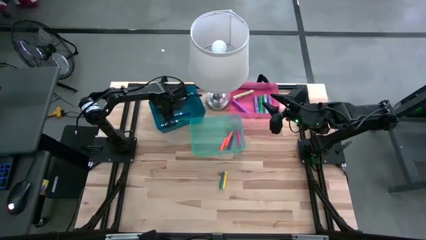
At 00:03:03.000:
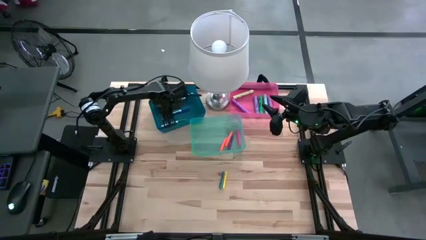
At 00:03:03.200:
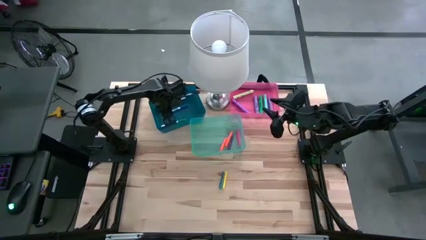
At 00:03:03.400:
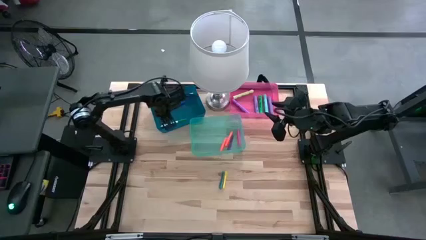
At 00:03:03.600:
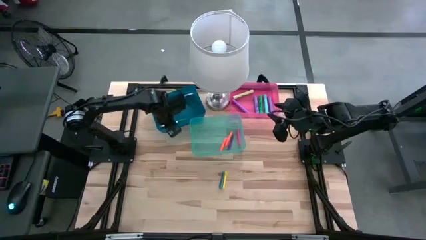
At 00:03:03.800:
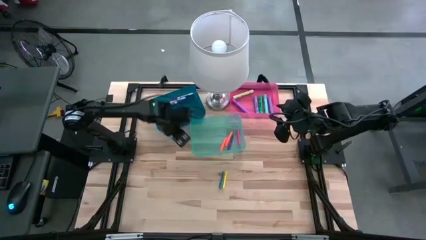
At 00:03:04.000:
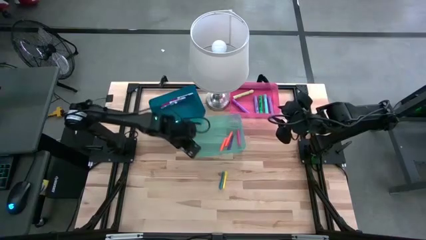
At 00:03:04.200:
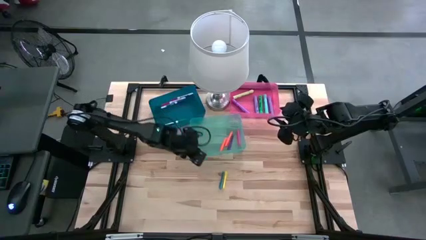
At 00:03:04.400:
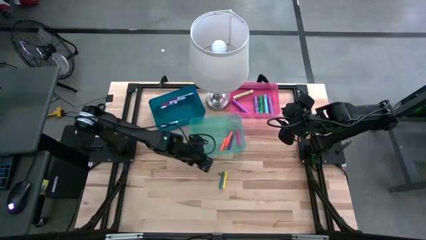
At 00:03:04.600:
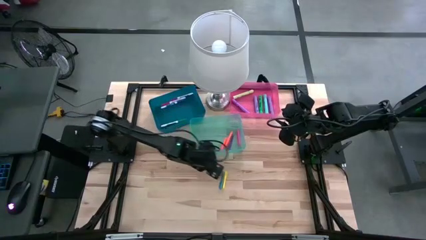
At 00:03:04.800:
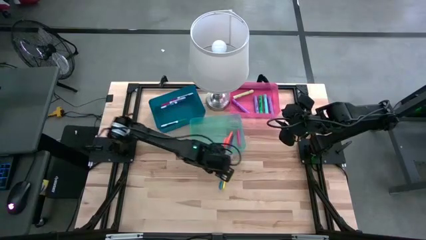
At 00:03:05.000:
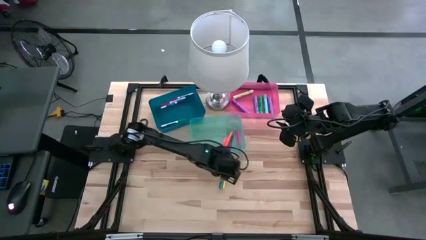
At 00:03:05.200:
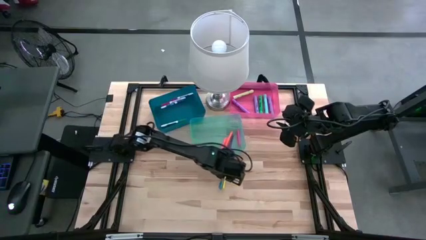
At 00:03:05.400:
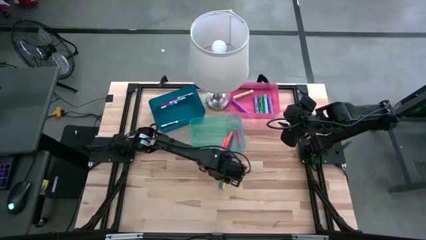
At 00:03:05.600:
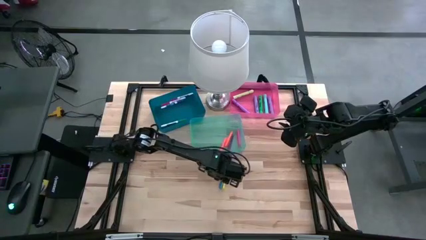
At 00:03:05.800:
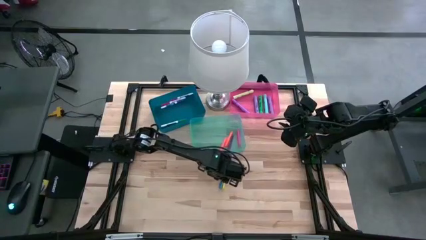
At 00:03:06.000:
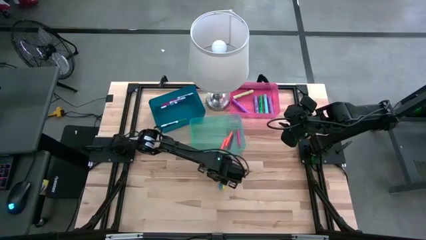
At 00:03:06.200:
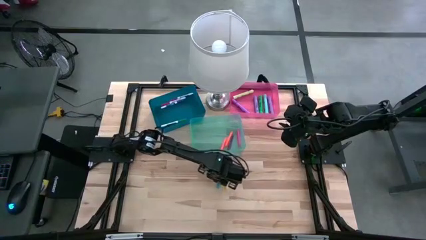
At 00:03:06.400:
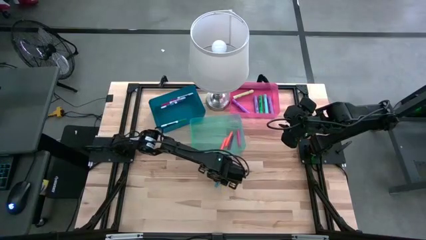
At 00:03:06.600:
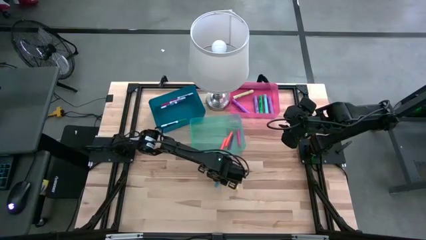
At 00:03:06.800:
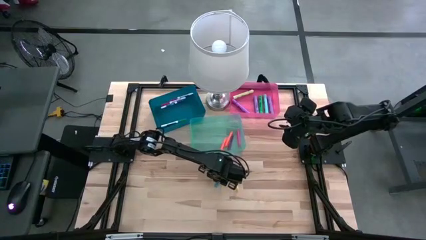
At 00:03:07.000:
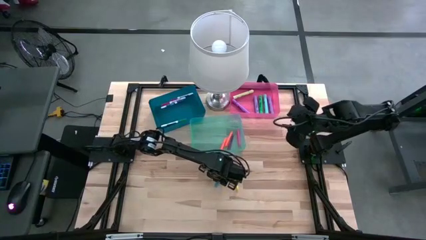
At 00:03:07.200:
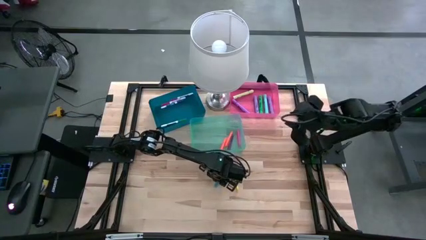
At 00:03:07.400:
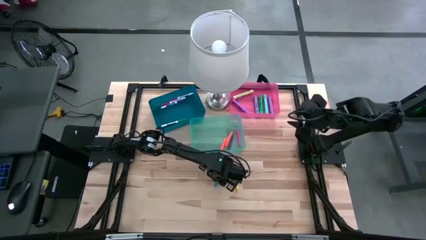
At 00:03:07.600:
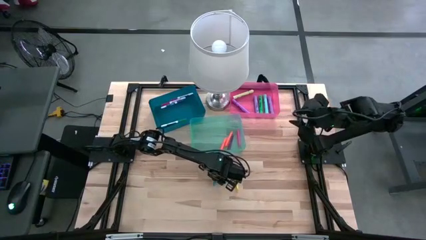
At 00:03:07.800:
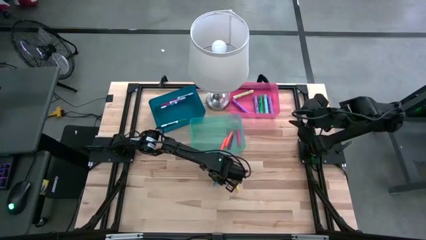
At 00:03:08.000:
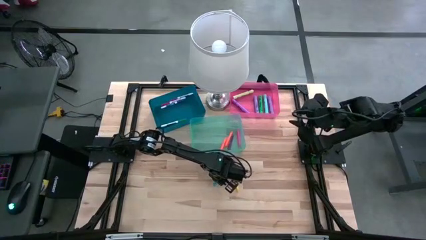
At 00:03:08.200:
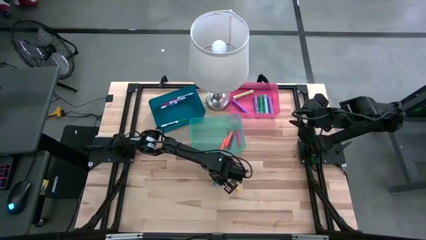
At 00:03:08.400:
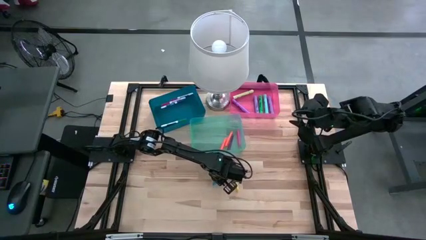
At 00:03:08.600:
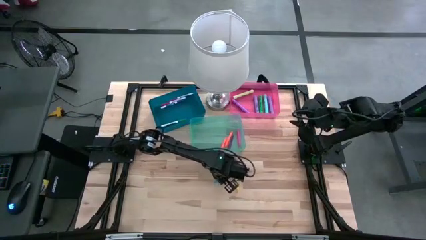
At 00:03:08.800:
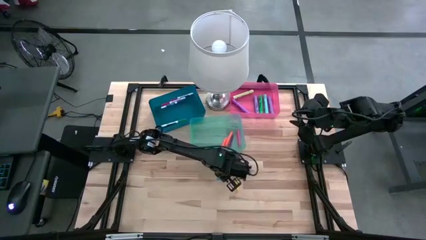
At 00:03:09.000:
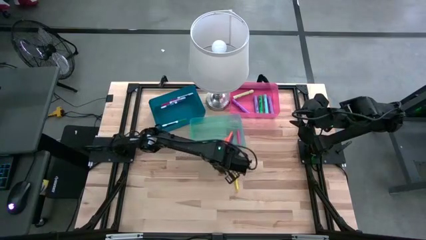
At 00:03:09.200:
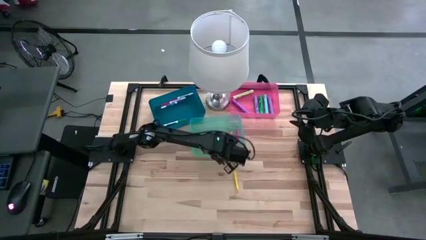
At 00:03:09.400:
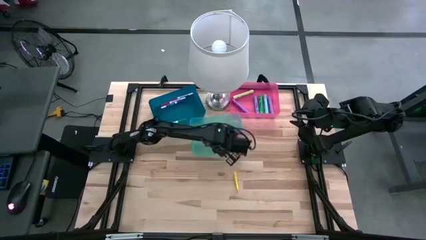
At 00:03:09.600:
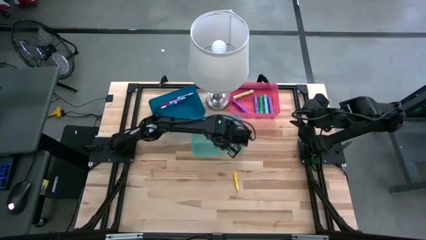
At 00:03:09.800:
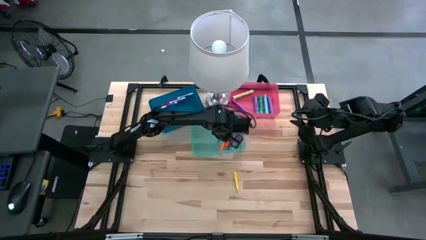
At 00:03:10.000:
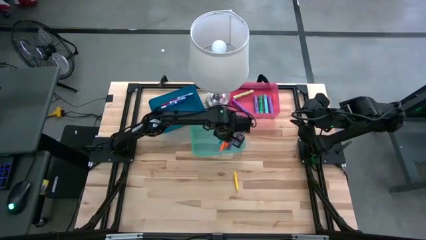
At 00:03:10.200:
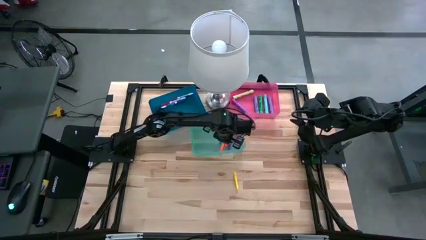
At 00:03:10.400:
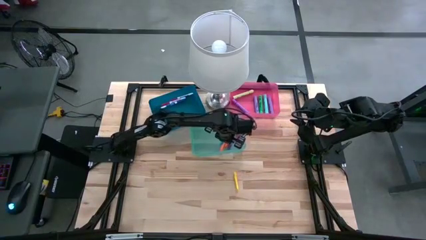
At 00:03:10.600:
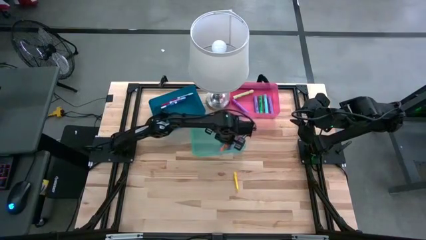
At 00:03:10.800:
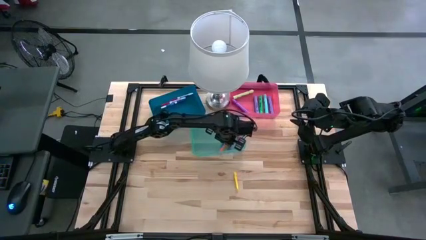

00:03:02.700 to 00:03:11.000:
Task: Pick & Place Markers
Put the blue pen into the green bin

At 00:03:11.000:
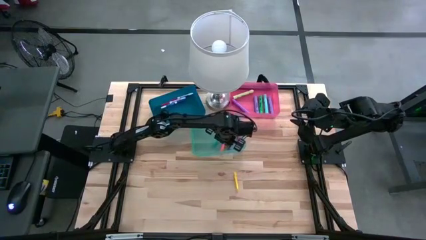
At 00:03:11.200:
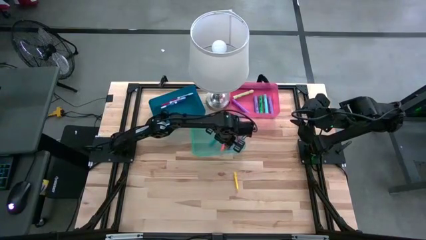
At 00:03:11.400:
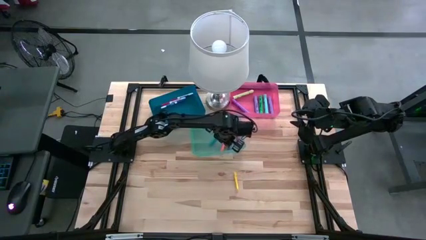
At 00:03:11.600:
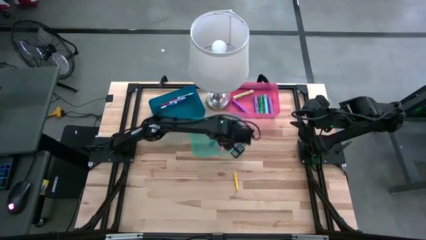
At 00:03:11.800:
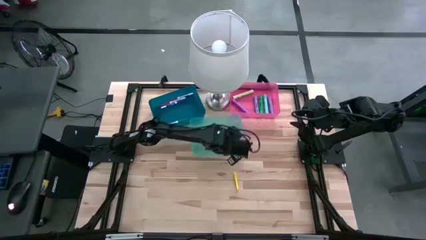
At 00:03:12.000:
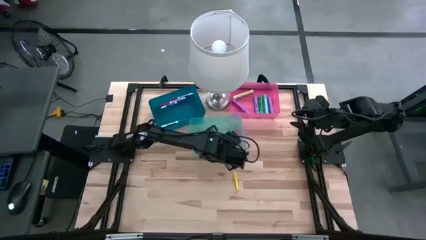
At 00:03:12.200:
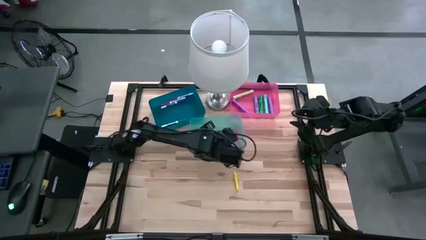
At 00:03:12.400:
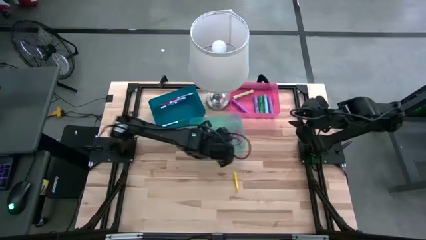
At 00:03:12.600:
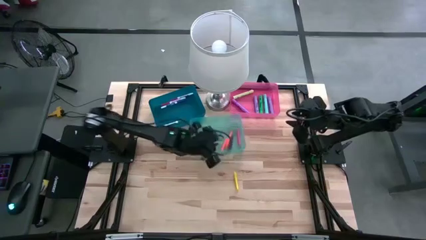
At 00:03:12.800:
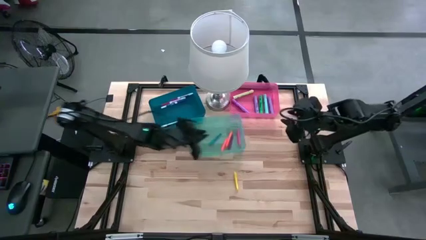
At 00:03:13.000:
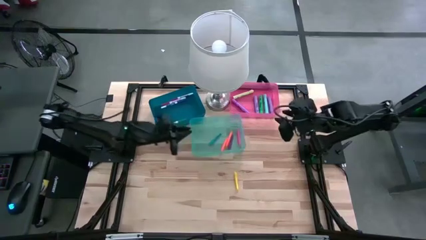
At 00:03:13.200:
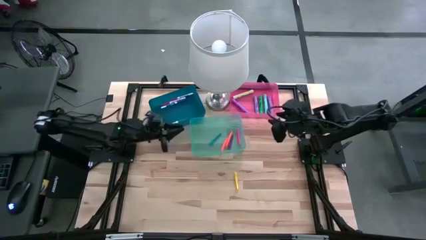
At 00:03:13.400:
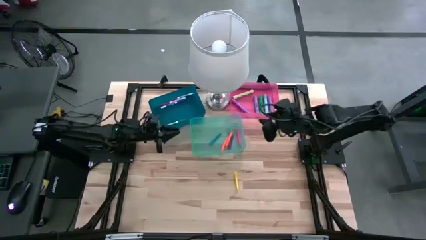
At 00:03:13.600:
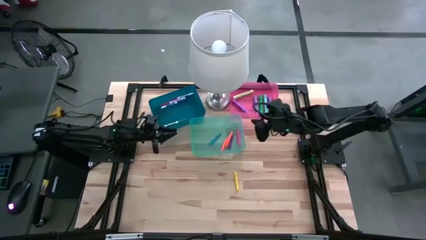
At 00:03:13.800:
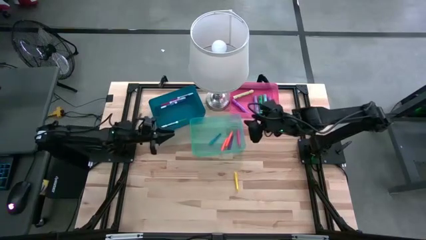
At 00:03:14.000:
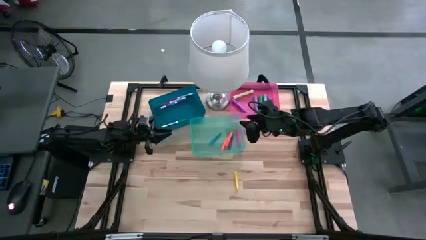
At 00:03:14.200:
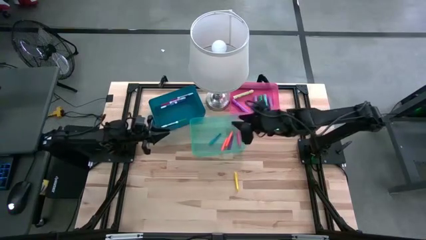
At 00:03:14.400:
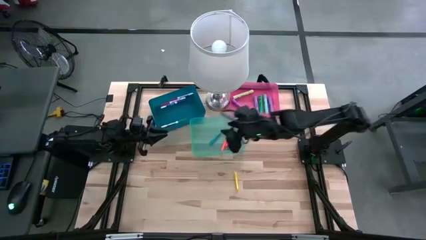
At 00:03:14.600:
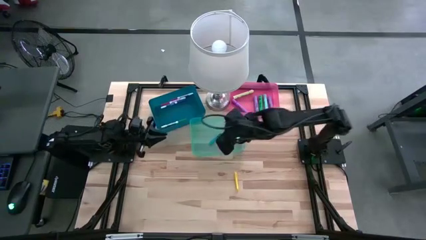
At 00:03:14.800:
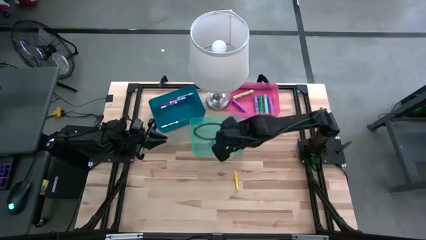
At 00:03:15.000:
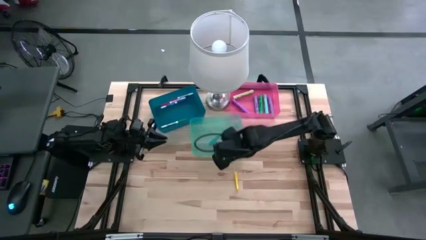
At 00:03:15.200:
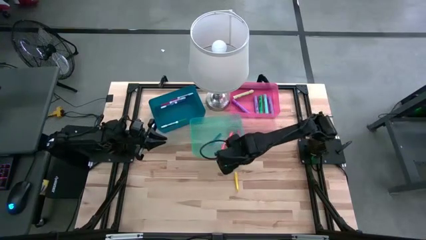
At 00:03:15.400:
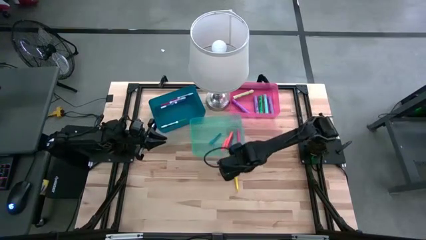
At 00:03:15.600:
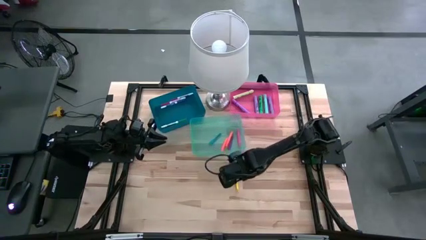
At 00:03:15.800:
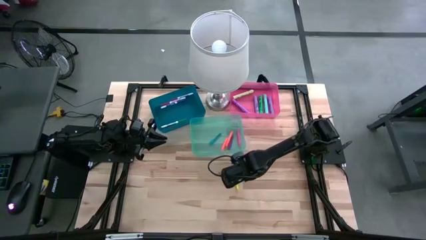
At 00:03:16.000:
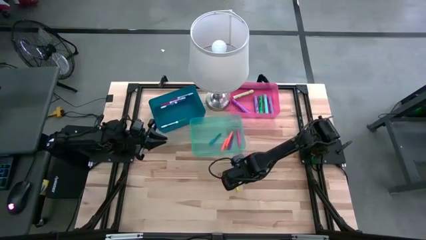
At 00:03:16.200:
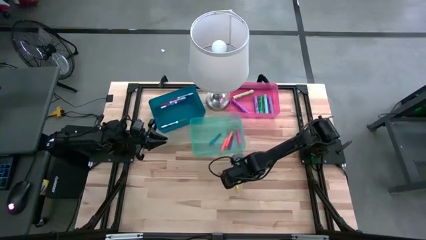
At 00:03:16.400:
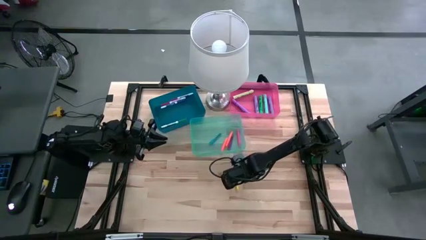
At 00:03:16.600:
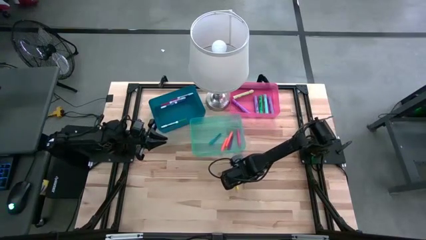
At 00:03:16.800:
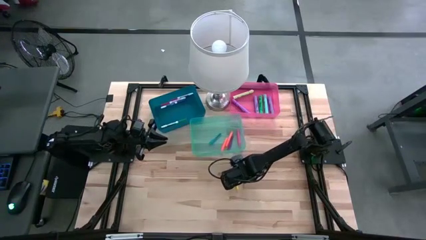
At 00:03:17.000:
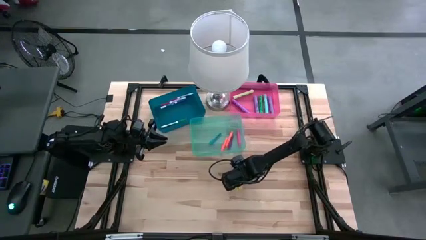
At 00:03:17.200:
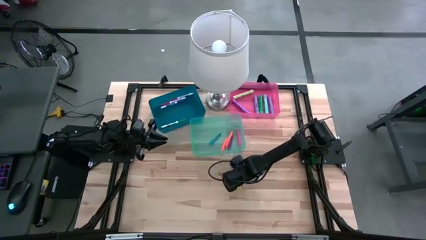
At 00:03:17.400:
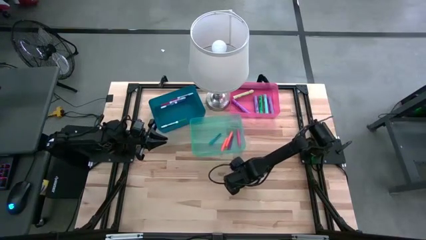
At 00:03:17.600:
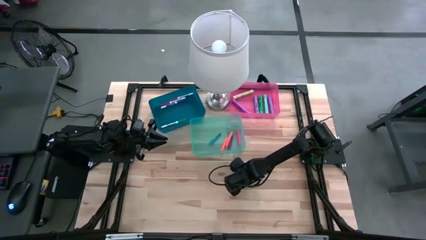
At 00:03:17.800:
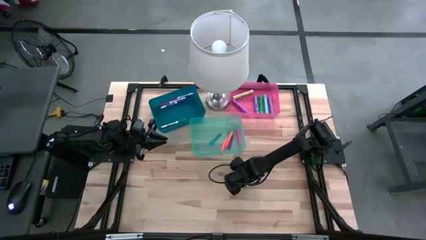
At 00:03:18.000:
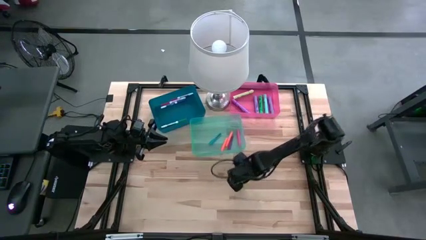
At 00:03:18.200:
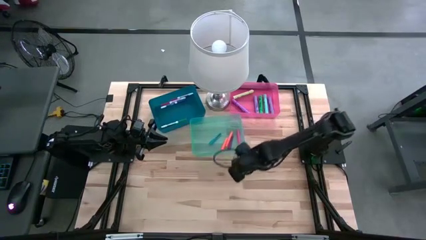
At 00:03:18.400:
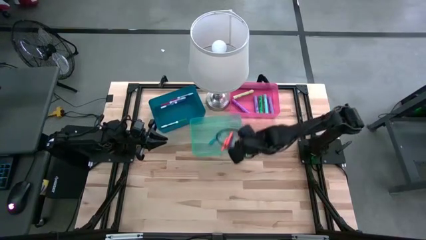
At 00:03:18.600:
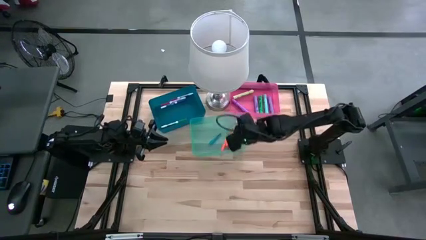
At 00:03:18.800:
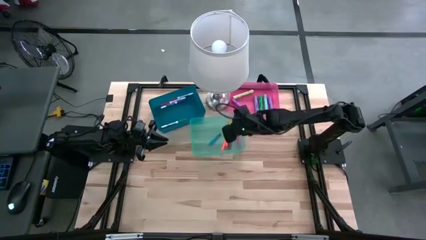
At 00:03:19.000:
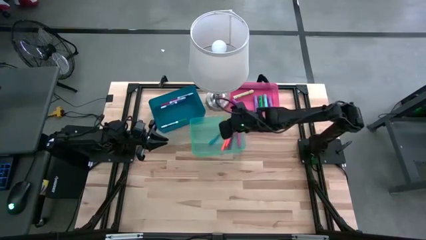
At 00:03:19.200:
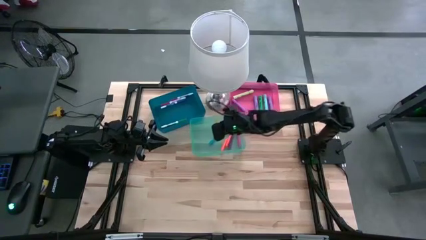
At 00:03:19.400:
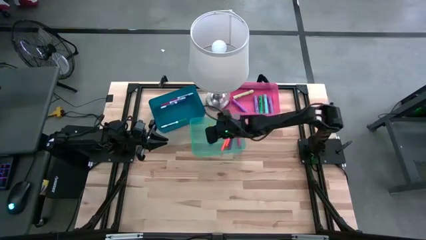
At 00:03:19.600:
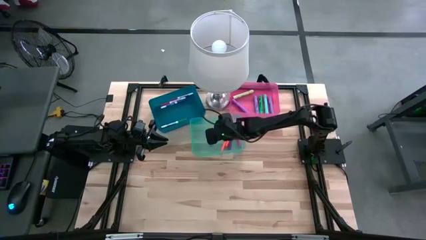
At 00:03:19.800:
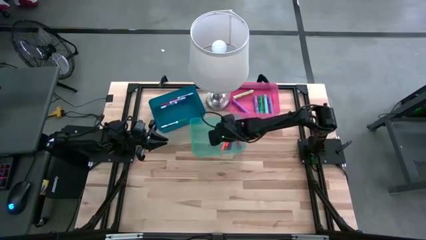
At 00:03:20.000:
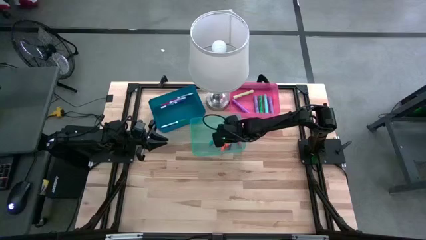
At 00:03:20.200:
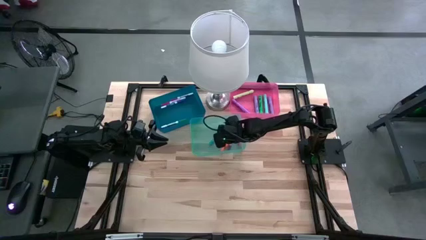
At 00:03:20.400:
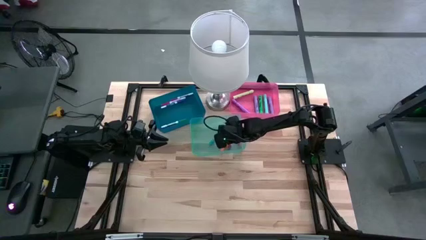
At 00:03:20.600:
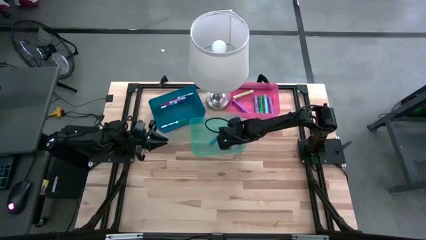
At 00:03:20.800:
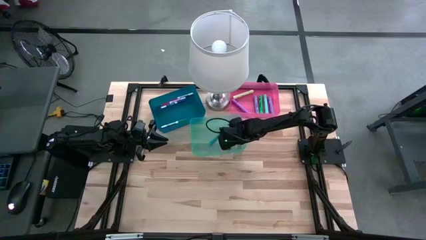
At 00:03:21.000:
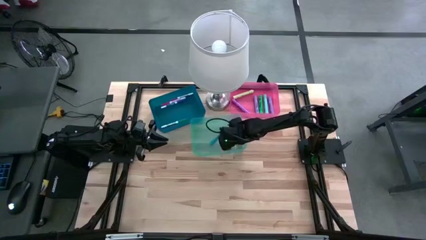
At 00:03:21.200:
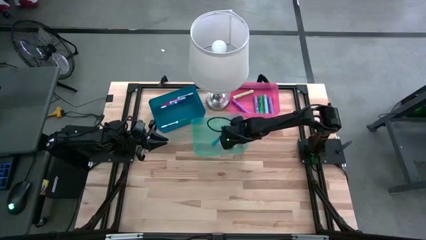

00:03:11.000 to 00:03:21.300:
Put the yellow pen into the green bin
